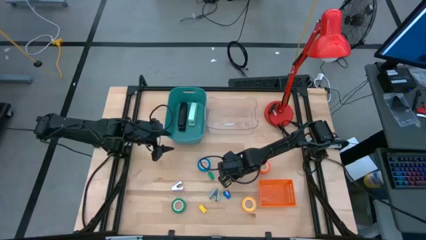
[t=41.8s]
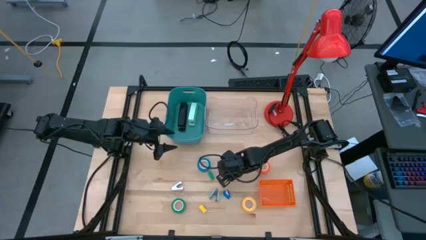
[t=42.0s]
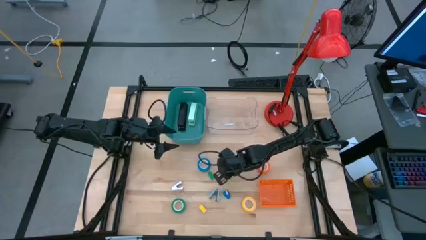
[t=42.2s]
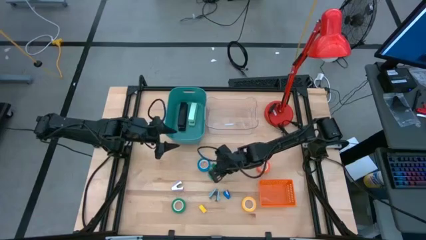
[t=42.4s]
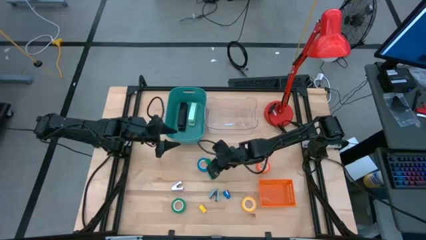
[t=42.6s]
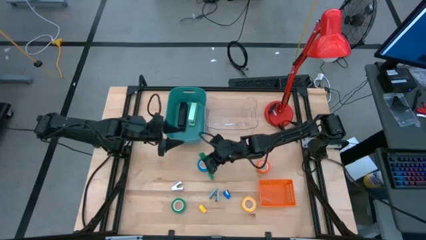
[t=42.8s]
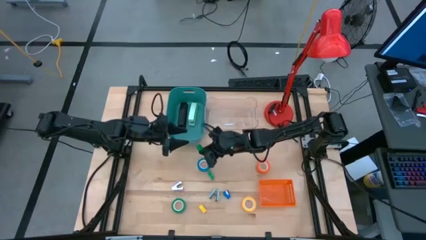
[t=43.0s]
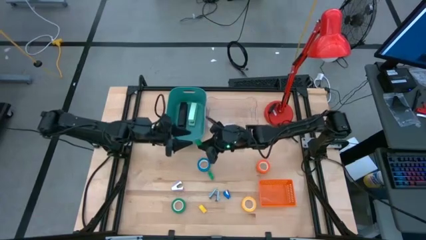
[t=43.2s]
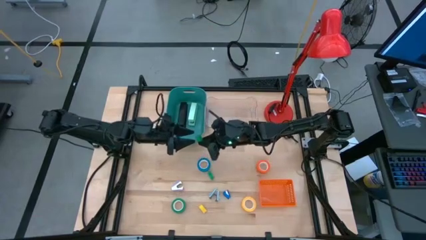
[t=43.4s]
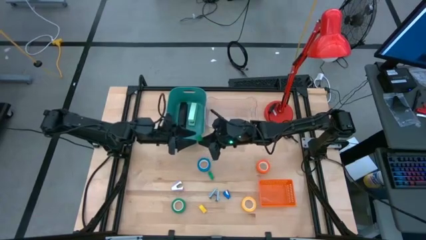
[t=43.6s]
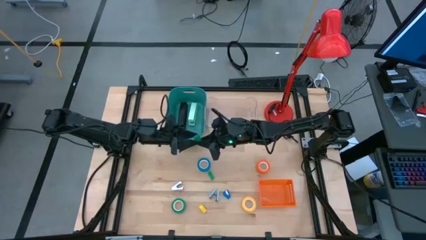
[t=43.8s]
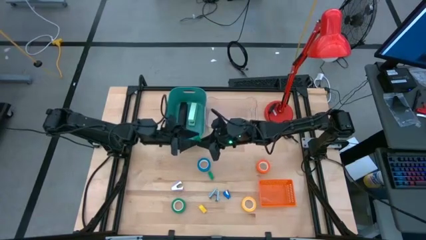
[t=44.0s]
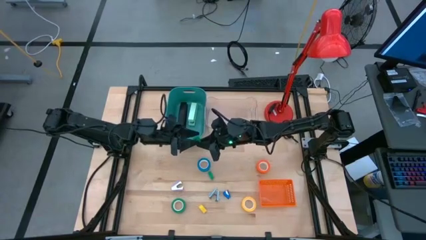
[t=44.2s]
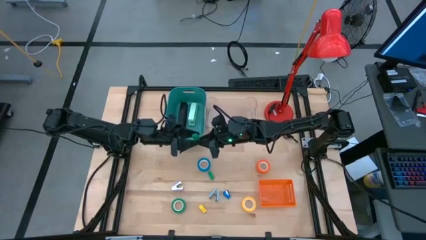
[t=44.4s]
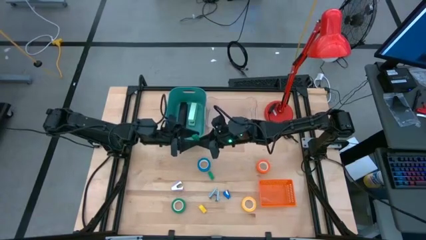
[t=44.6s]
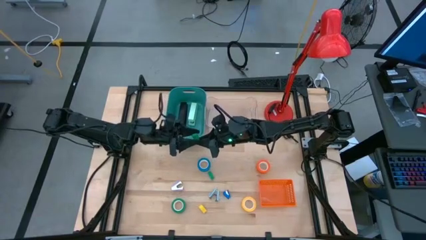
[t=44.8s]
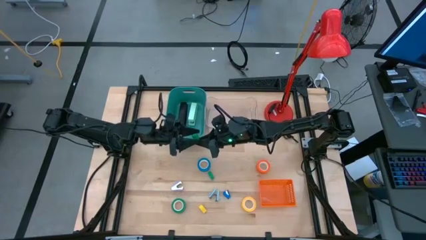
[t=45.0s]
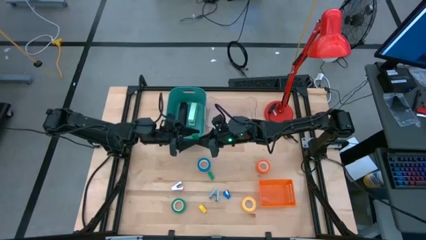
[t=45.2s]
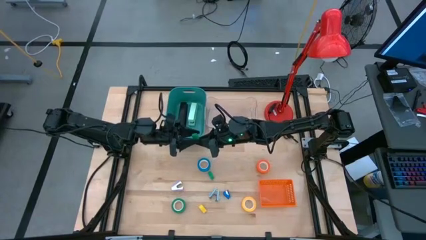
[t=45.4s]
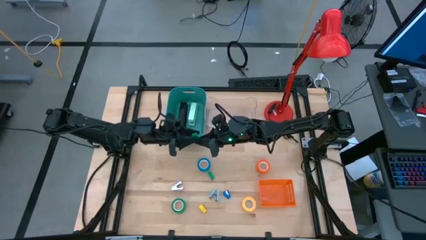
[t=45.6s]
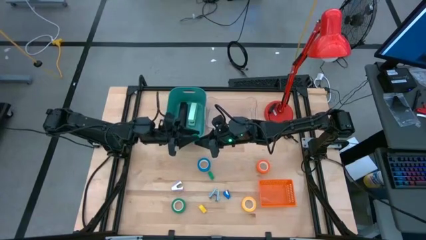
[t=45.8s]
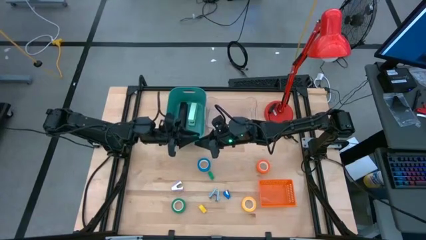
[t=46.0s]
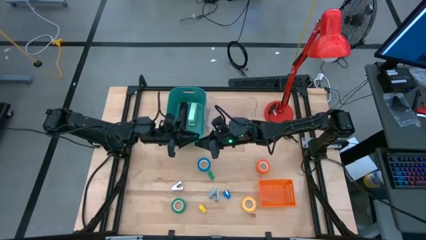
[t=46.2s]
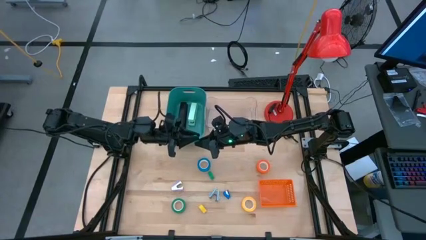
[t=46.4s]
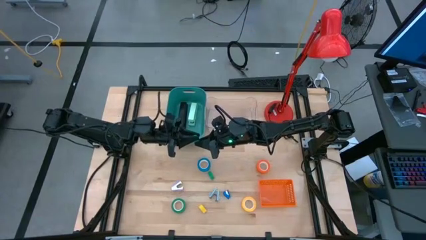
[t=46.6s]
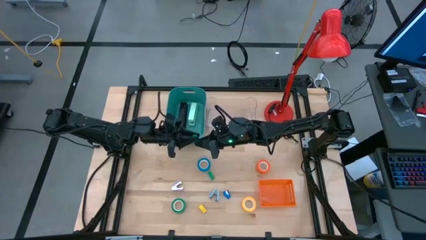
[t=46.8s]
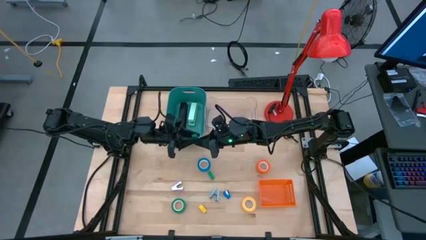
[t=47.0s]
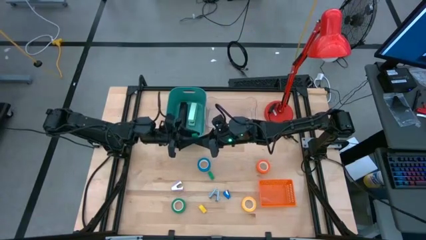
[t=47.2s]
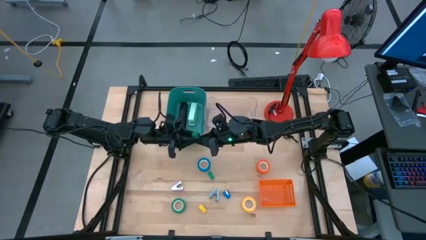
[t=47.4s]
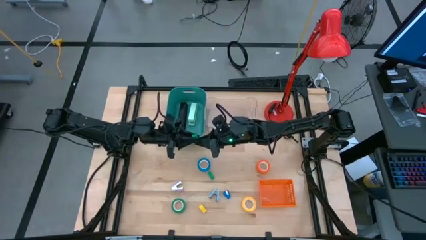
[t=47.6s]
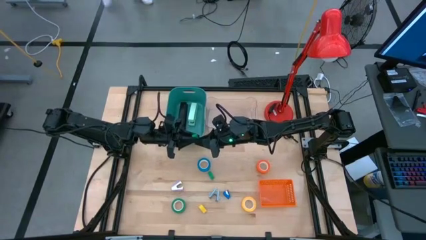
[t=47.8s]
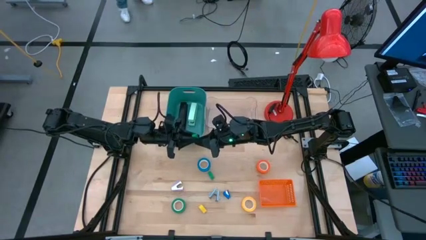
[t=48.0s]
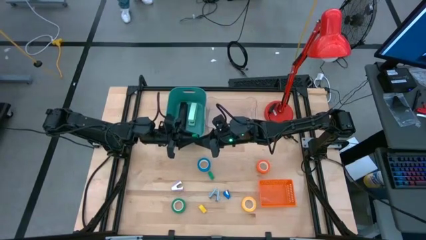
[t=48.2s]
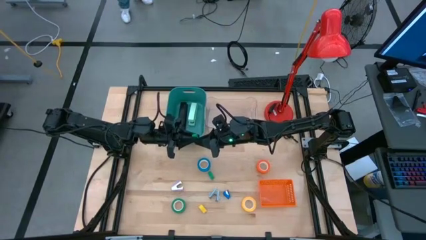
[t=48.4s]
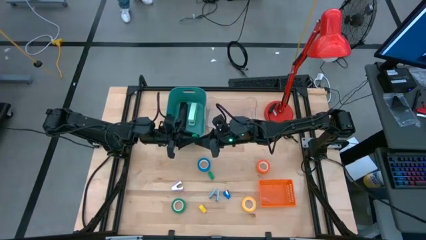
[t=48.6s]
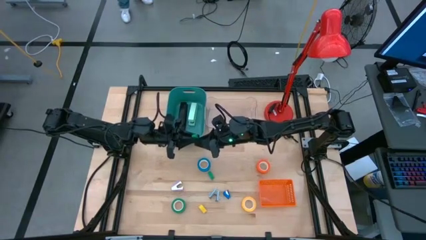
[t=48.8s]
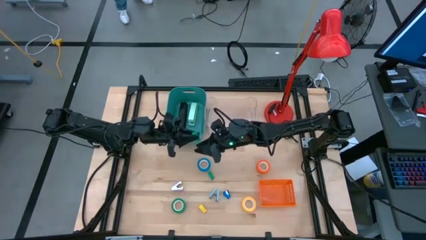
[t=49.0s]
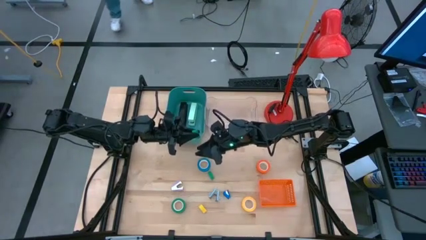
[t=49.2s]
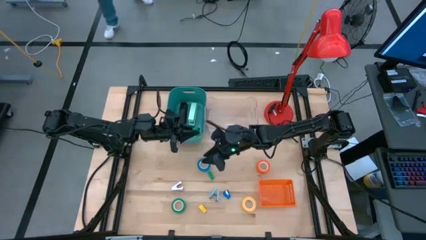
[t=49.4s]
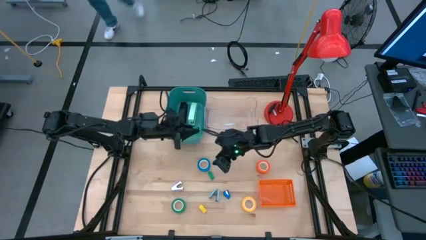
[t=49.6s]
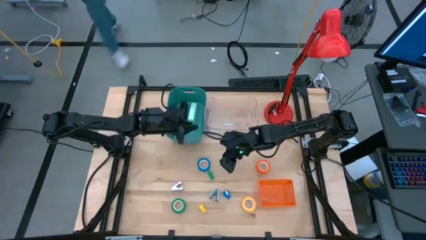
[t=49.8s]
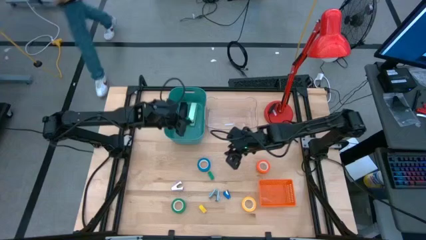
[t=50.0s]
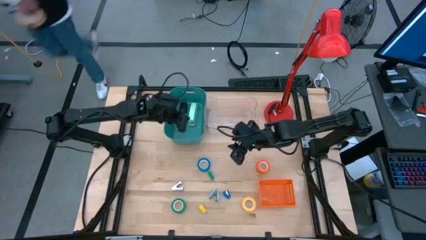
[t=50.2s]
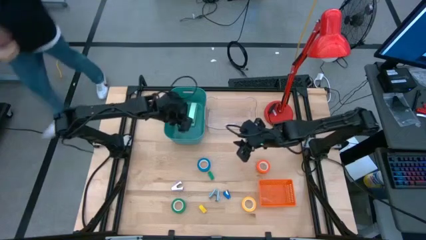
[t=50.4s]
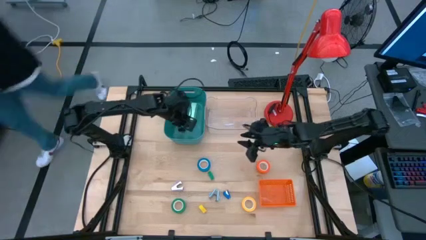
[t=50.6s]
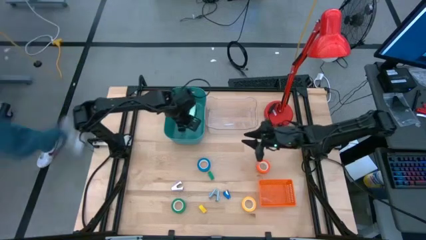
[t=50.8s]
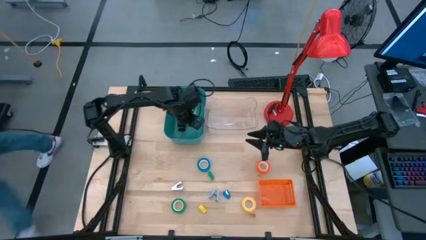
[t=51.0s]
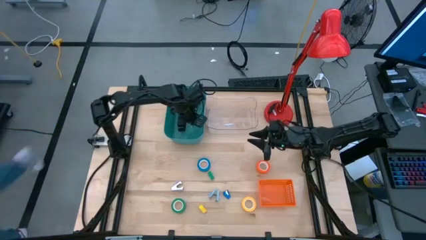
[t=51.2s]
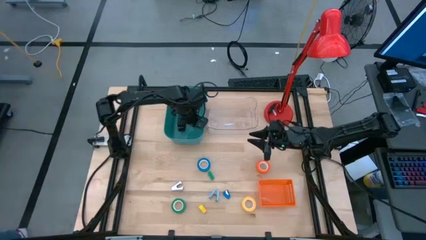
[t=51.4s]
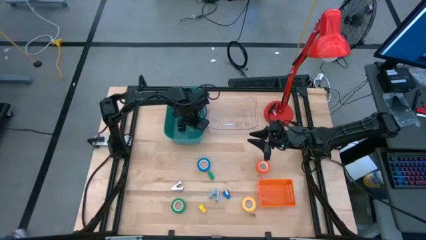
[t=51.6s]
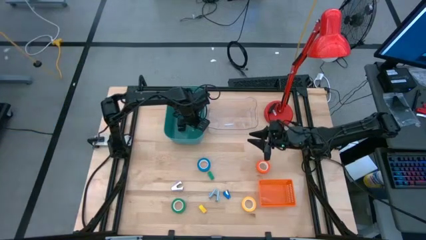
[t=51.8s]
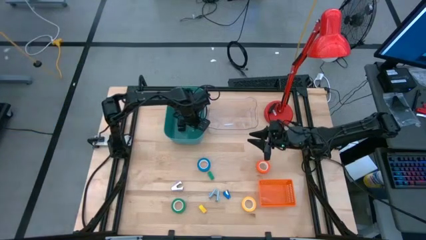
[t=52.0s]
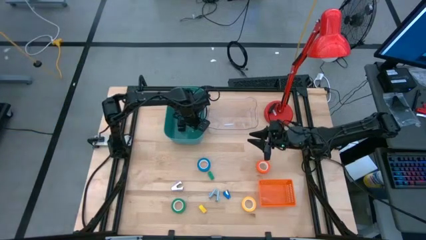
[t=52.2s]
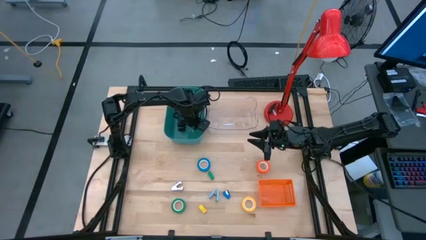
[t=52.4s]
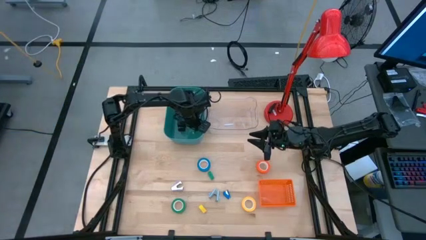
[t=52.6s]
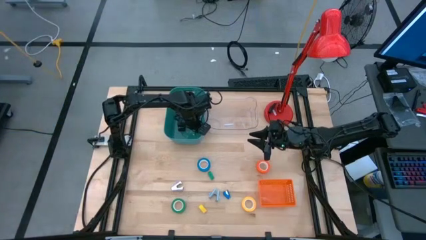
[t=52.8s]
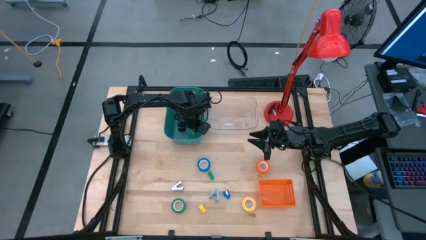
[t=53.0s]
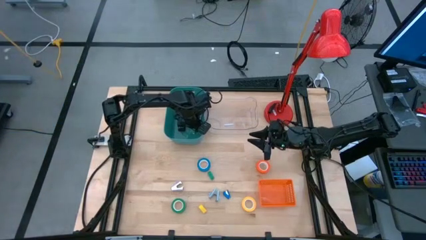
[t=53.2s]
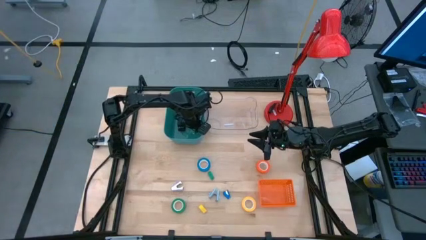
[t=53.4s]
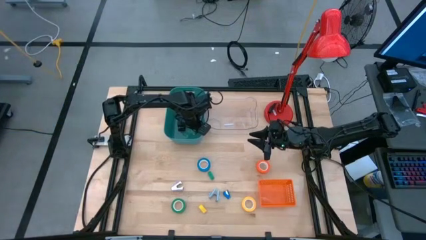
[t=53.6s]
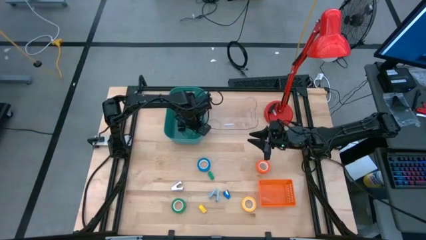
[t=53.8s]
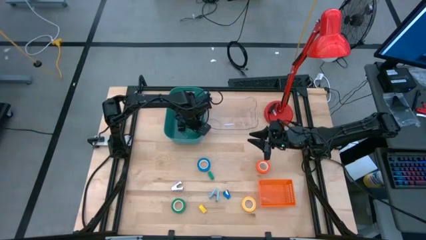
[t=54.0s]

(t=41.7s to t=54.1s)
Task: Pick and place Stapler, Stapler remover, tape
Put the right mini green stapler into the blue bin
